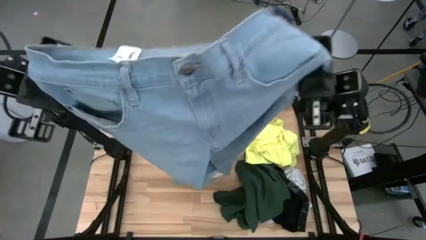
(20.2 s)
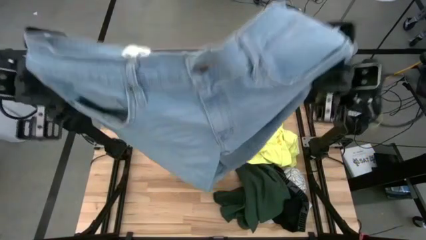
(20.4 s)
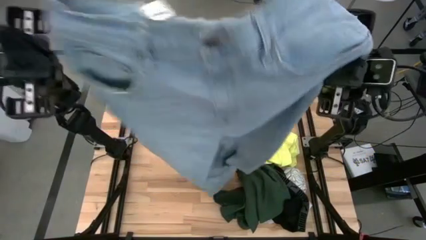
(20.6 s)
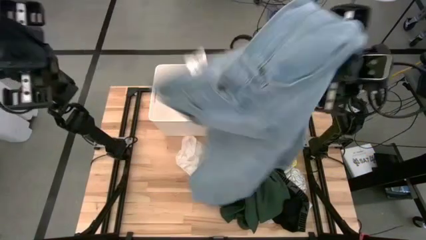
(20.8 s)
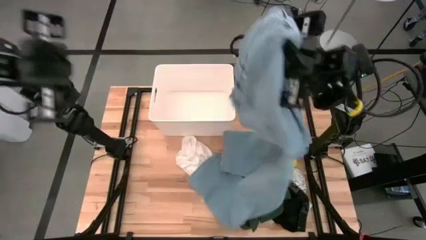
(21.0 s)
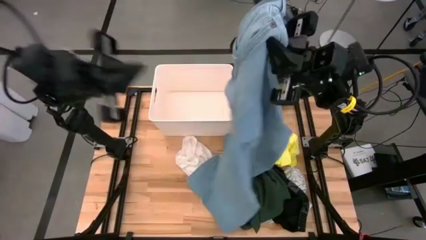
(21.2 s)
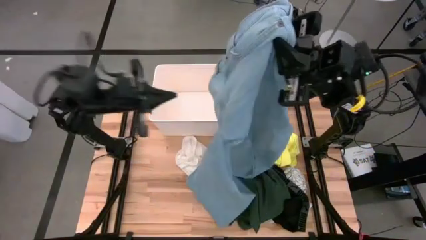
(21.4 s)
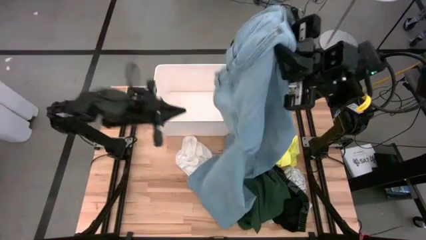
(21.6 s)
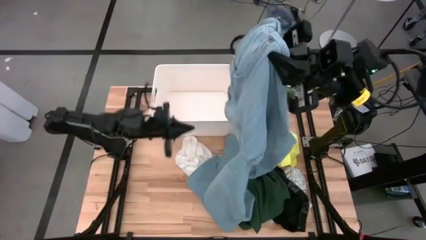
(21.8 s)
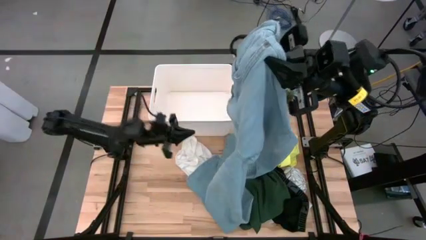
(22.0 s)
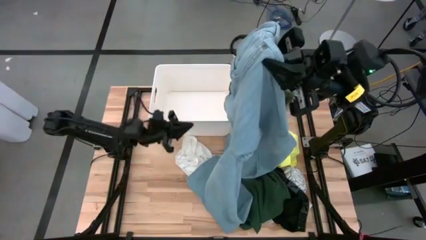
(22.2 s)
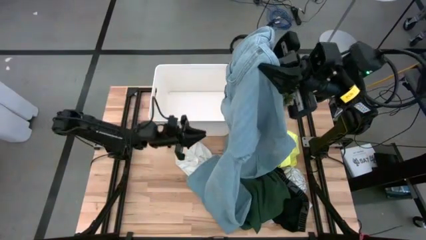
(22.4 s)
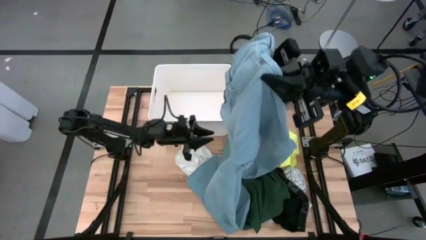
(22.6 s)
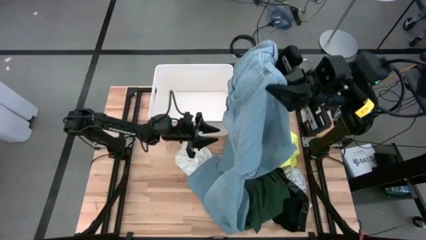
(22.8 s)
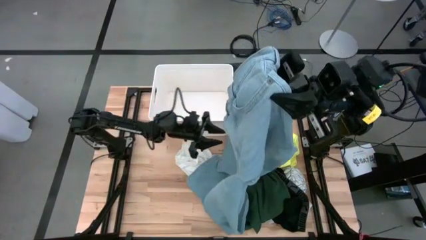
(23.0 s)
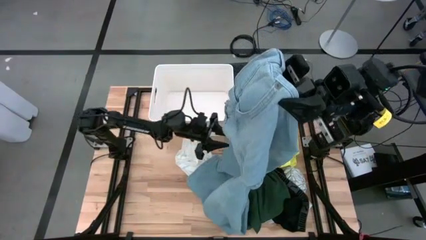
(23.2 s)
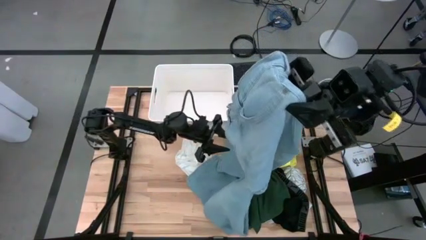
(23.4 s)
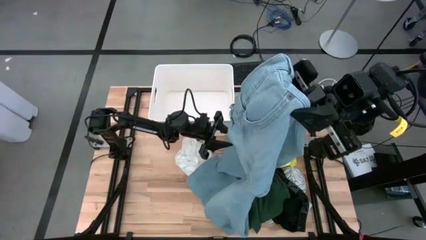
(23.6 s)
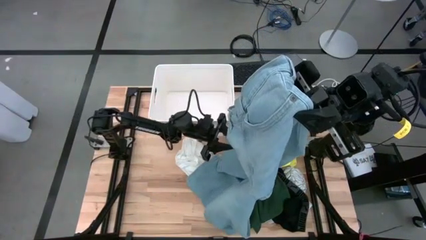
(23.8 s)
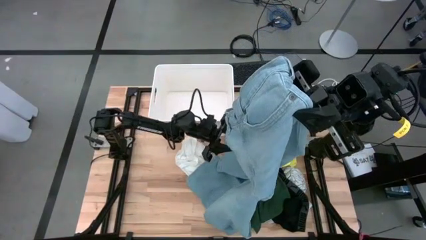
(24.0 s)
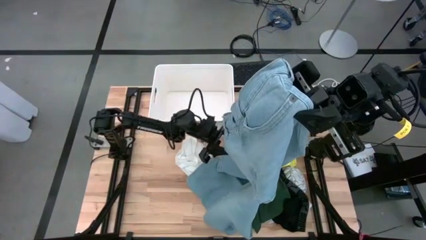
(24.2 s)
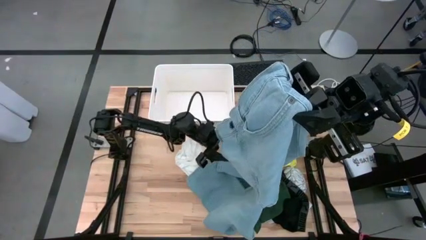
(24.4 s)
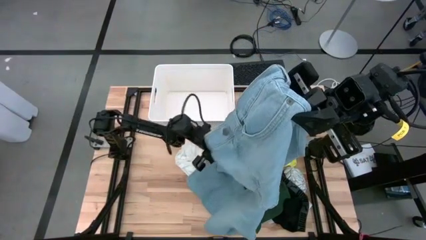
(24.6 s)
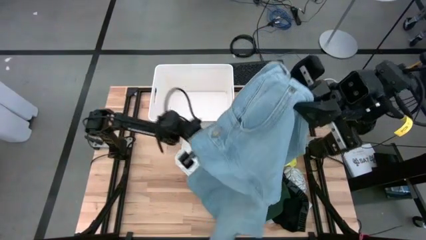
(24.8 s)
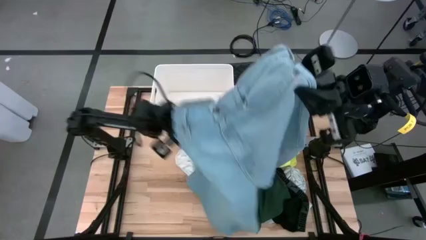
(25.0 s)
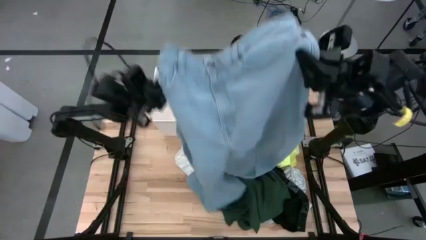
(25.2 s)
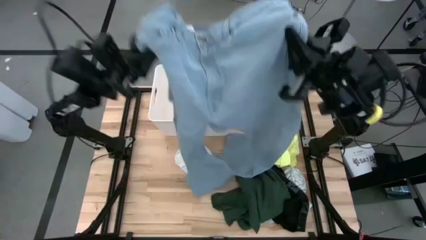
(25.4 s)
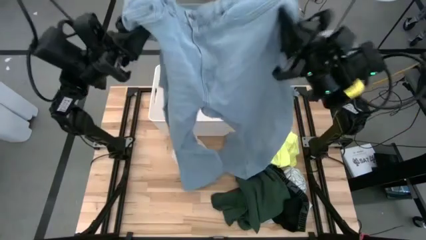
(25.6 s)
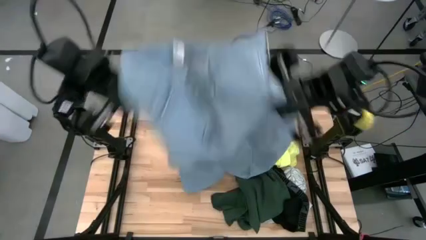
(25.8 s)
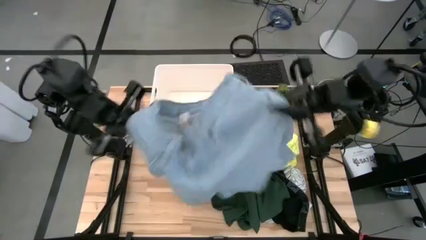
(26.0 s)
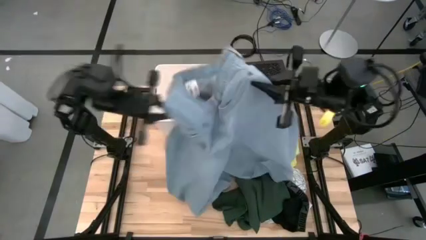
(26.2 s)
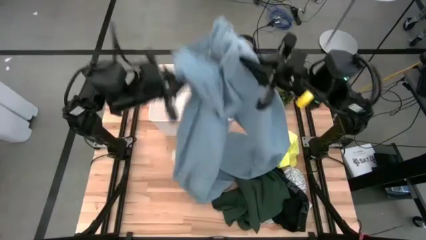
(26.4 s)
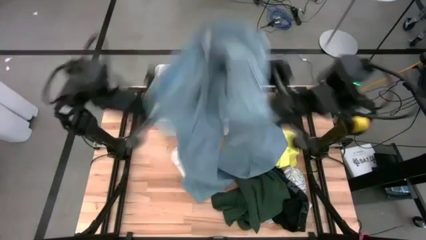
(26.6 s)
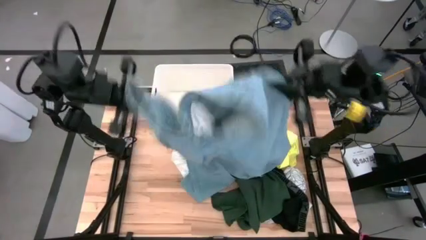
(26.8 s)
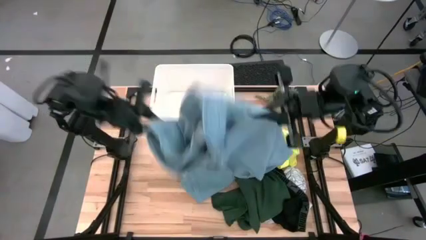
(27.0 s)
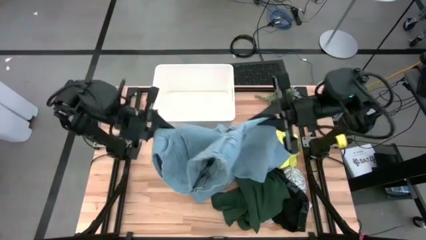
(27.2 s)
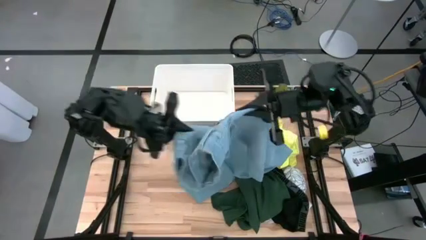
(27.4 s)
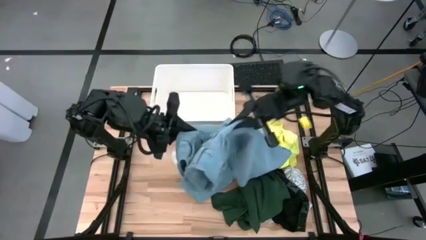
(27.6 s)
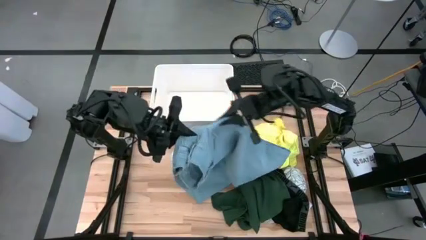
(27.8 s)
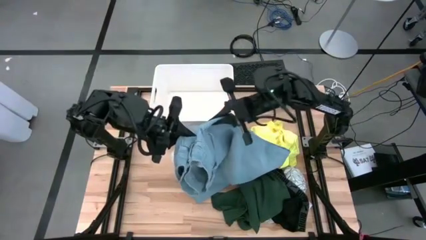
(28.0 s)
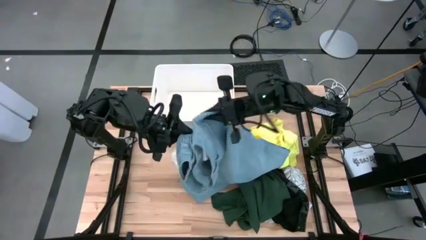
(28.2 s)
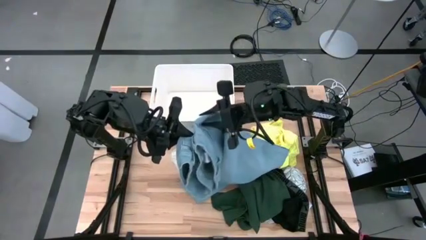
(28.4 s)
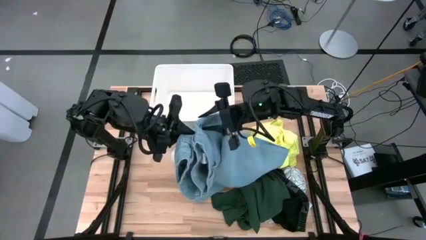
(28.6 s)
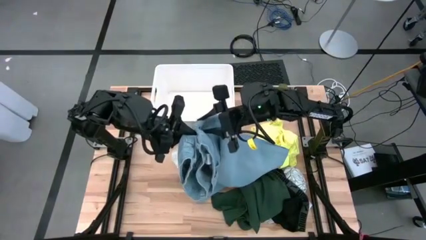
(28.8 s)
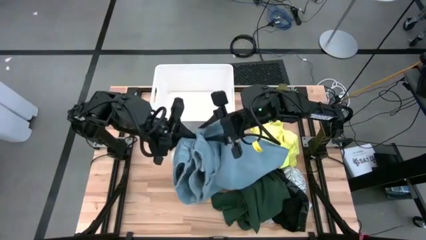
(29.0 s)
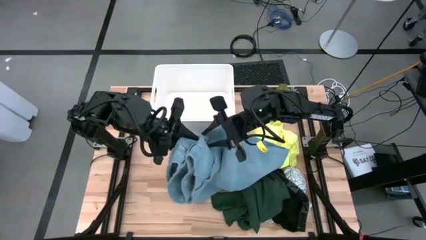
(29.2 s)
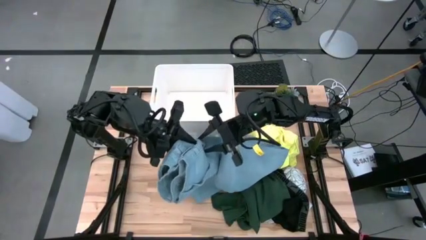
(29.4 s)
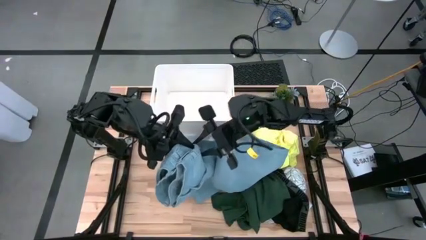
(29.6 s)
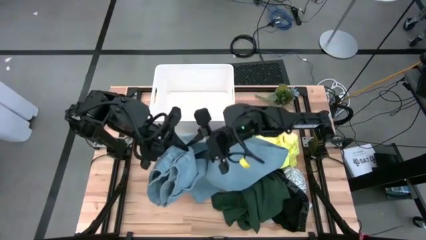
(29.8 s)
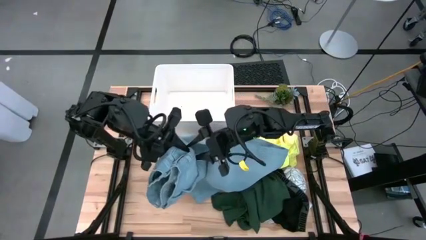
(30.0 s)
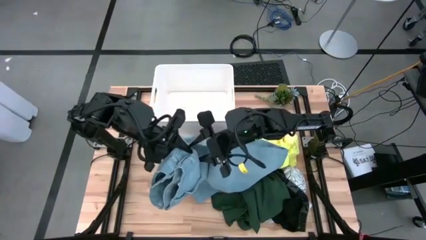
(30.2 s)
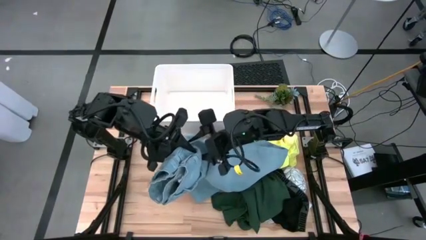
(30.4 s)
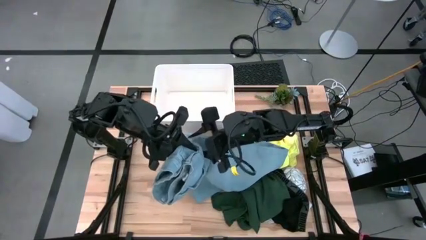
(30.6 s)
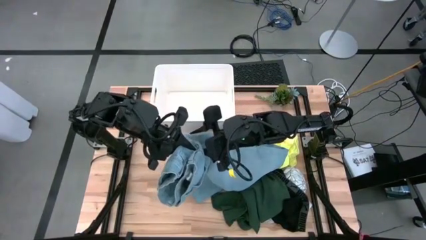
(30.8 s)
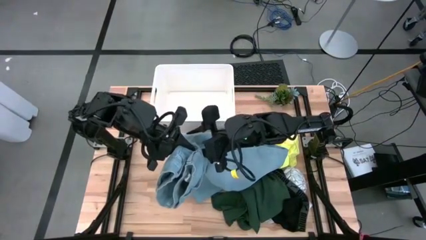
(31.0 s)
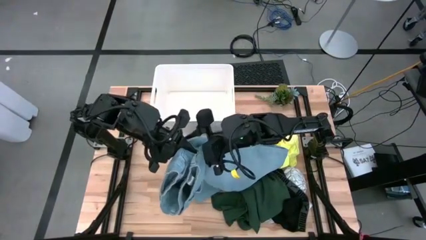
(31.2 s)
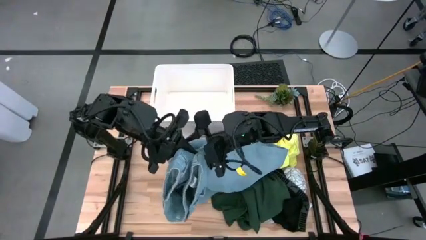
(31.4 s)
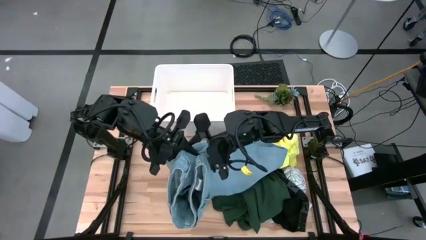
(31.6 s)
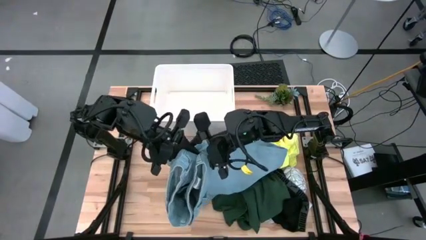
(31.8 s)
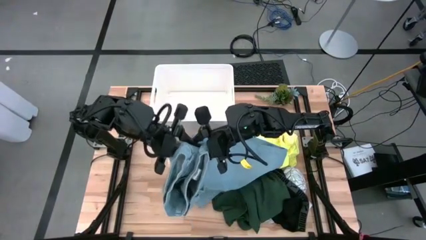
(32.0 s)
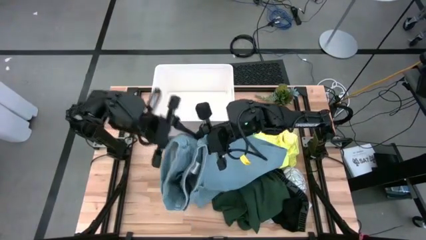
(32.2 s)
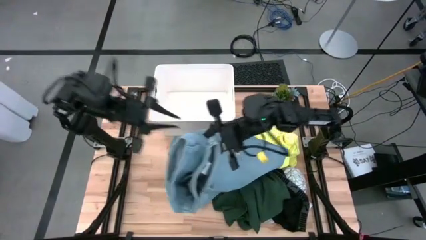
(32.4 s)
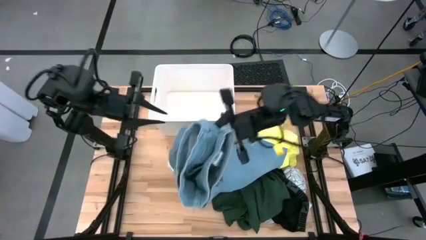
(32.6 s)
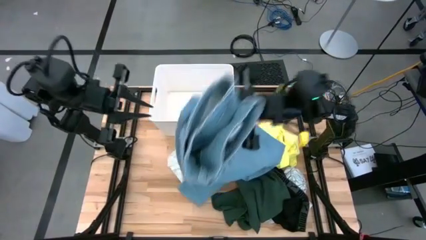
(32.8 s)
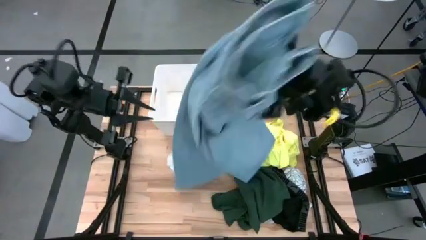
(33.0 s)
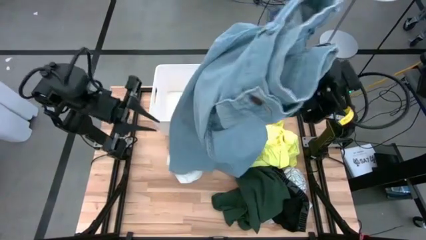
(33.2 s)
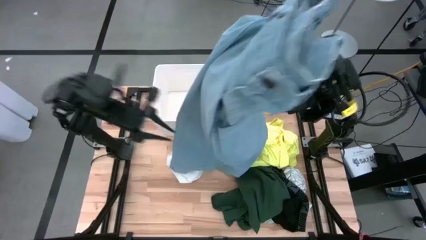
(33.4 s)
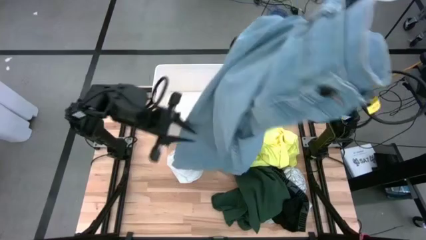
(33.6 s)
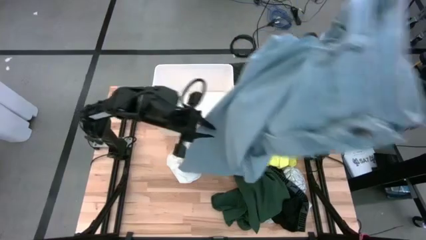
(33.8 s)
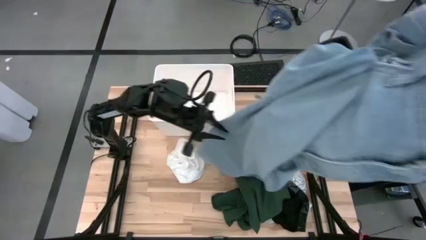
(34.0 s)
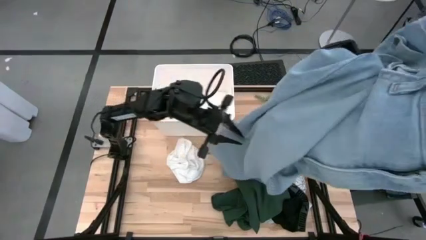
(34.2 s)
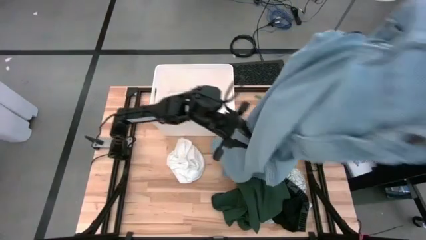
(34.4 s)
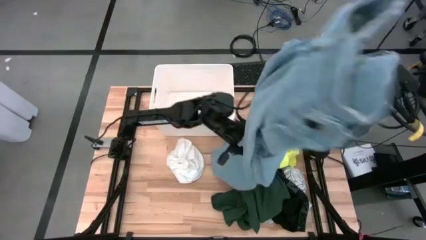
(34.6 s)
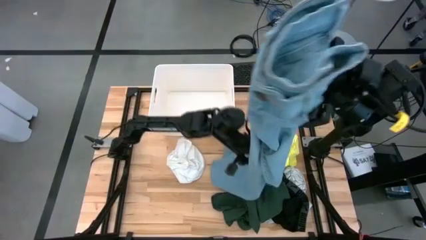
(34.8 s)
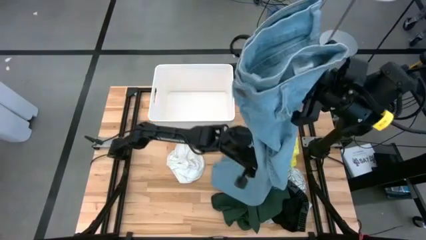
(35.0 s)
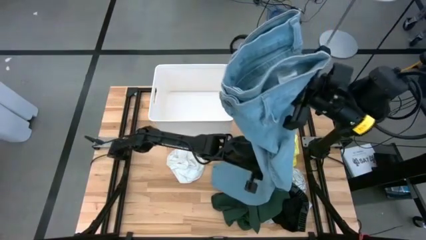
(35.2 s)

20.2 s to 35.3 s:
Task: Fold laundry
Fold the blue pants
